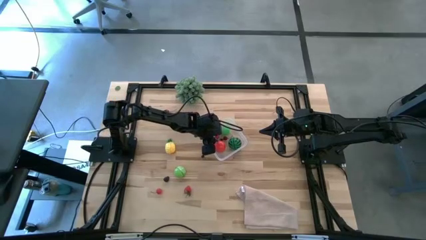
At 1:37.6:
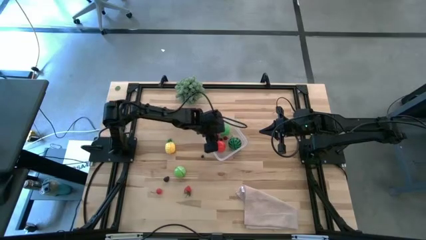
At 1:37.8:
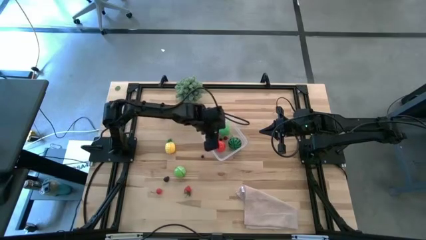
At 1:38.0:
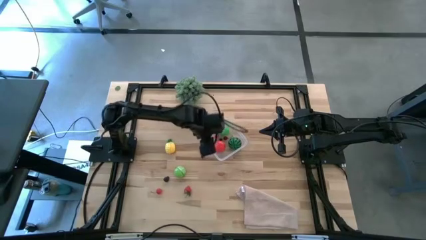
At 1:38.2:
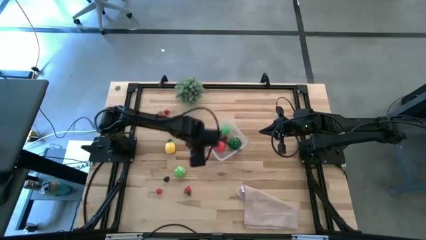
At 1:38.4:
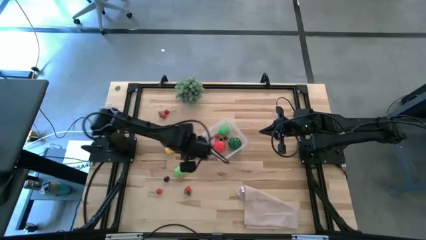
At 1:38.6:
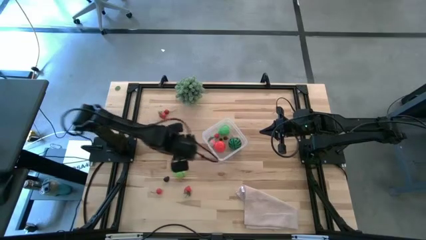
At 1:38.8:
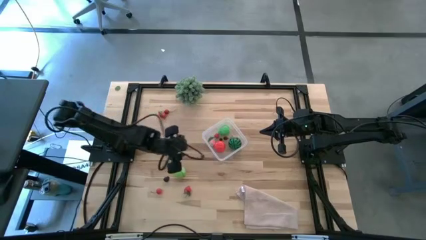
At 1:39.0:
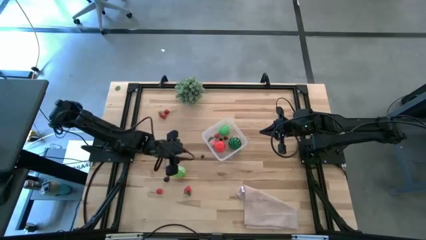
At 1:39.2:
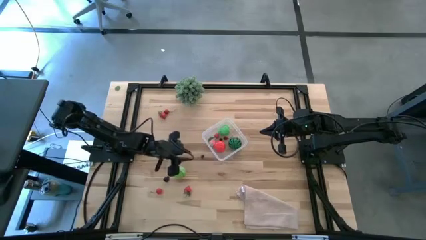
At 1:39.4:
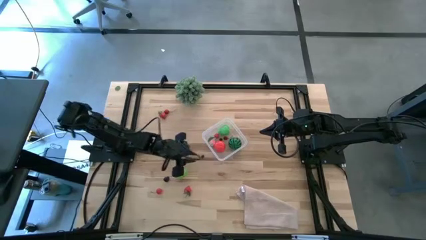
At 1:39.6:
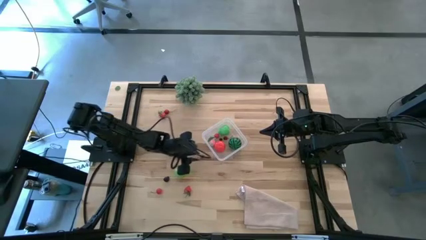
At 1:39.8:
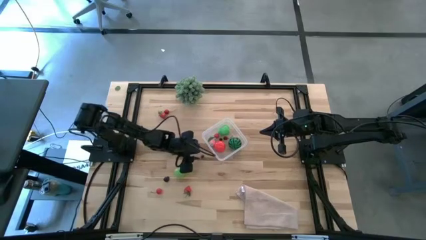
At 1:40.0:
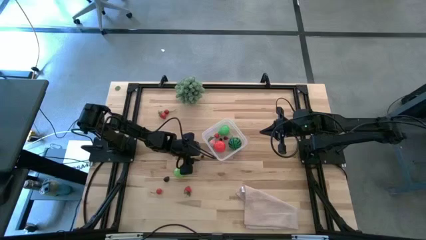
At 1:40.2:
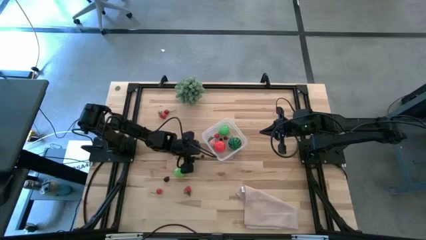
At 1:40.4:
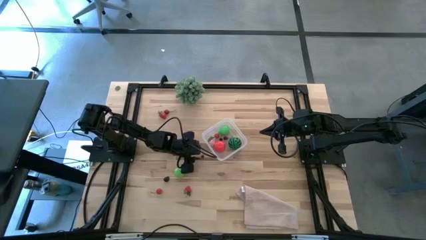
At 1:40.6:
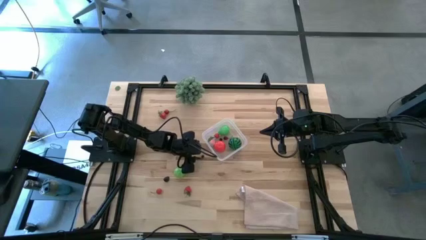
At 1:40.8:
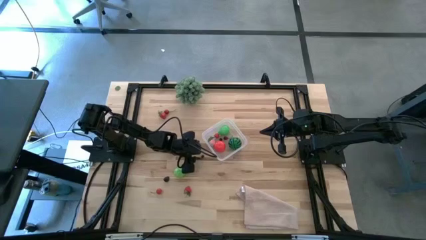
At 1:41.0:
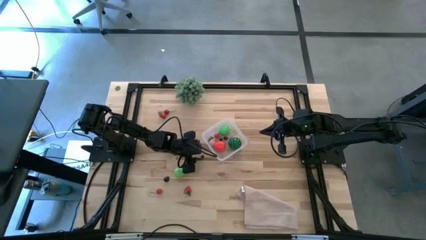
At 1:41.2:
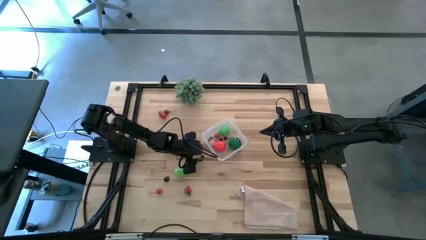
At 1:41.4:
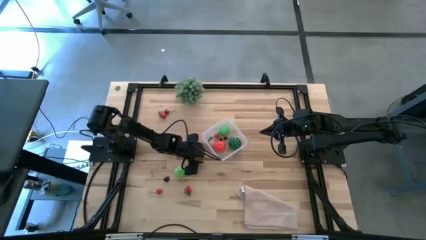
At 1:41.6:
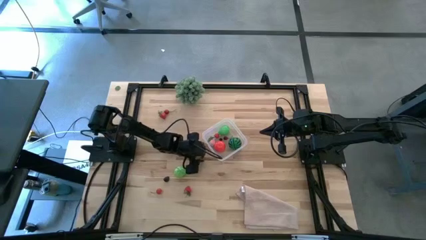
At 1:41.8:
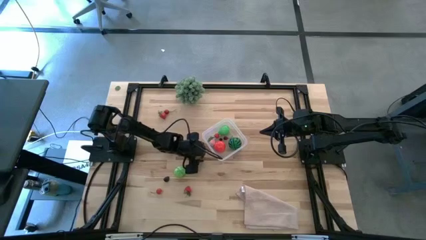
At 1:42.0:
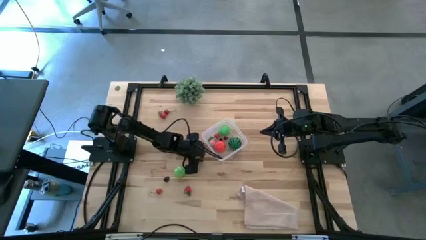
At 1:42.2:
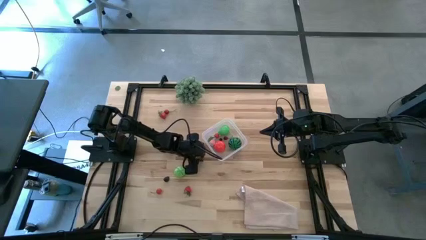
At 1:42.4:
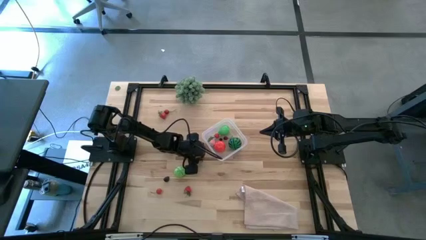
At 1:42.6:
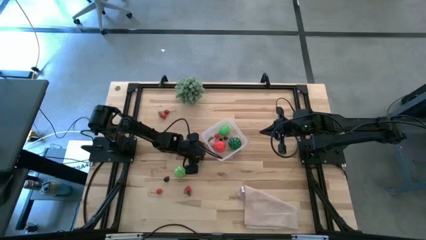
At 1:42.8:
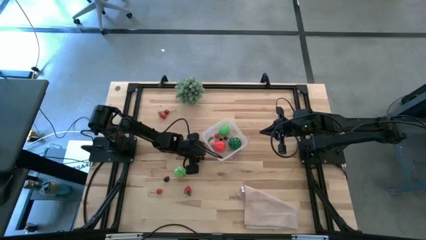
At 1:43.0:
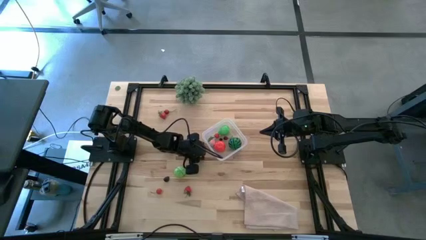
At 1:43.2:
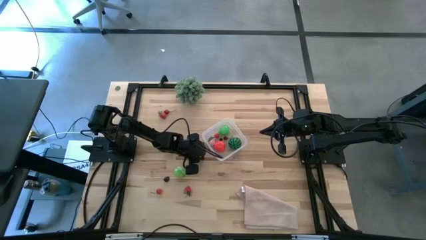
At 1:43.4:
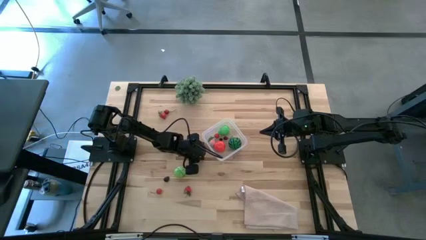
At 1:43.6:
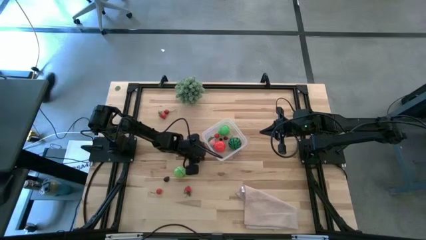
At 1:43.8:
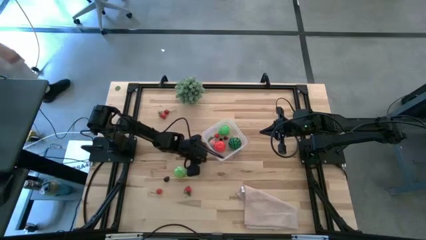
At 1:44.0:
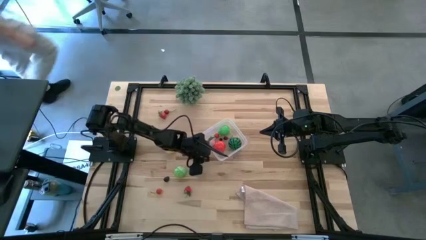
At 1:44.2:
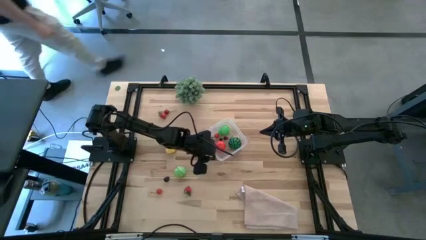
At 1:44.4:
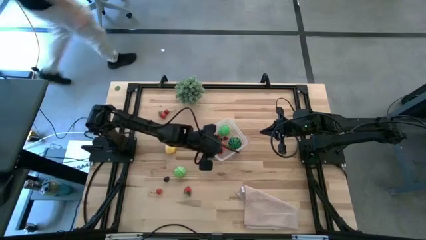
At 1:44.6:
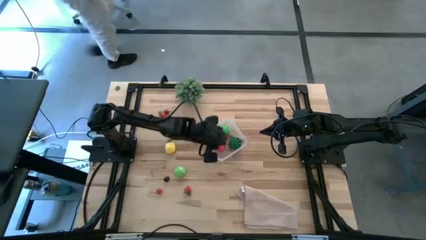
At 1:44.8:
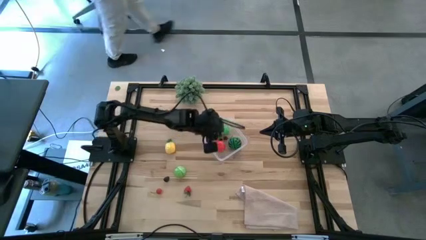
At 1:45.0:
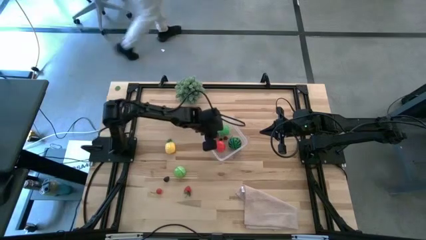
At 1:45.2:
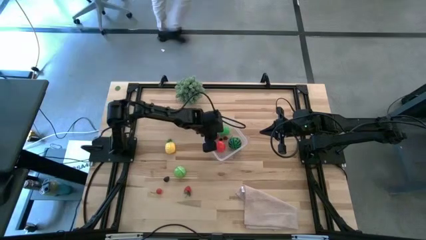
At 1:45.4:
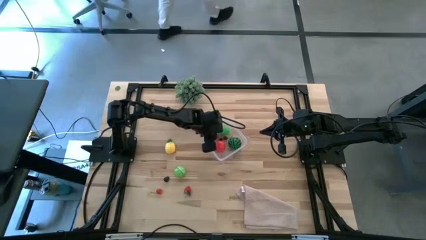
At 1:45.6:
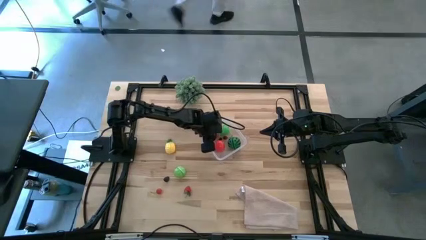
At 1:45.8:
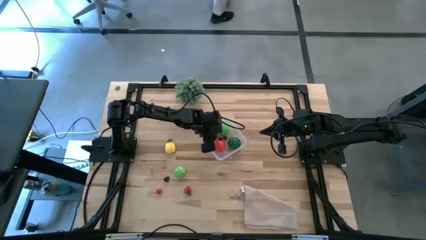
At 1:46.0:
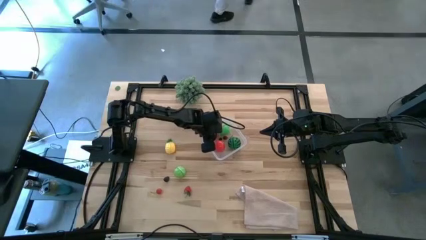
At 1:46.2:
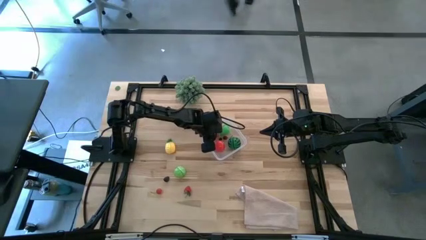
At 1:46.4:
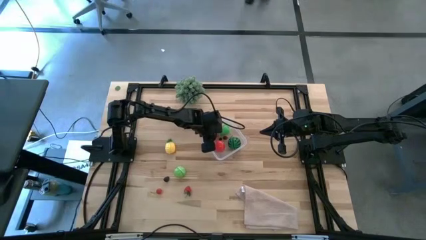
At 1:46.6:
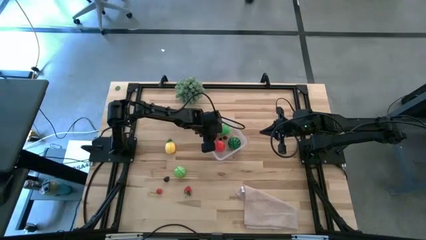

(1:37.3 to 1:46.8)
Task: Pick and placing Produce into tupperware
Put the blueberry into the transparent bin

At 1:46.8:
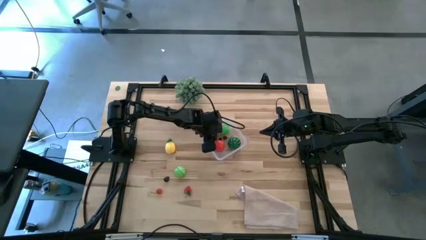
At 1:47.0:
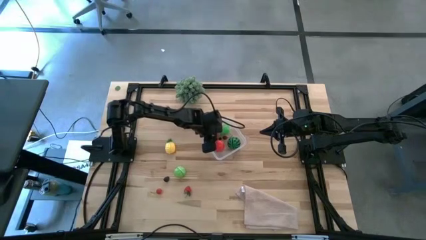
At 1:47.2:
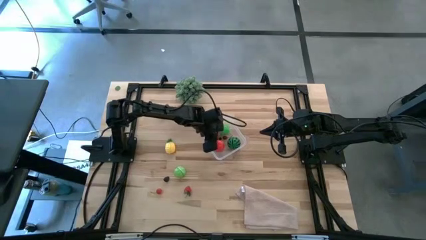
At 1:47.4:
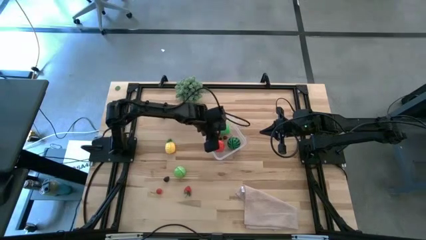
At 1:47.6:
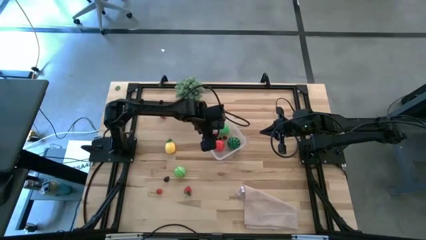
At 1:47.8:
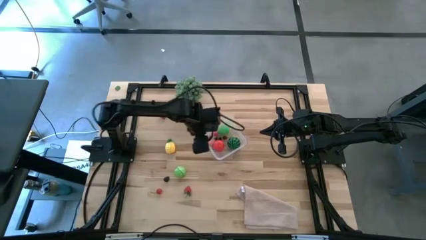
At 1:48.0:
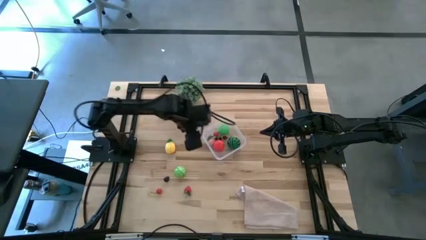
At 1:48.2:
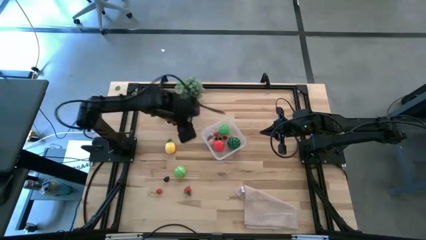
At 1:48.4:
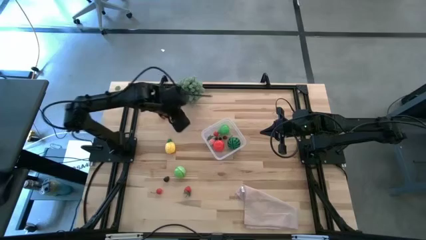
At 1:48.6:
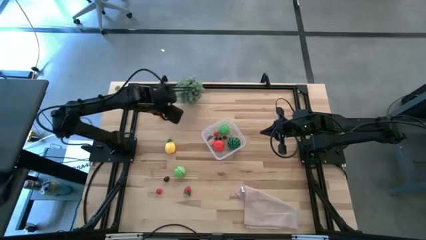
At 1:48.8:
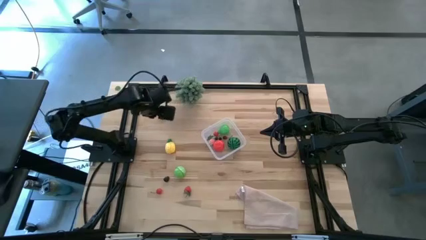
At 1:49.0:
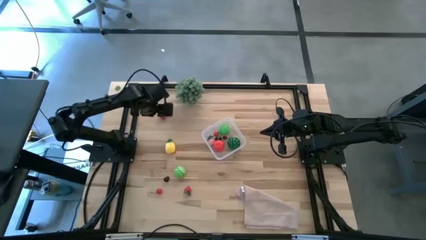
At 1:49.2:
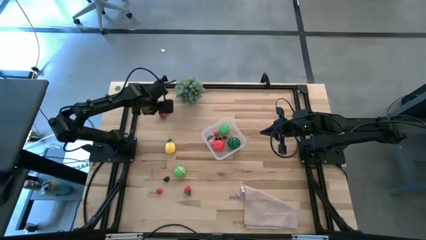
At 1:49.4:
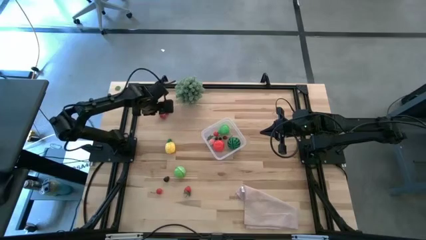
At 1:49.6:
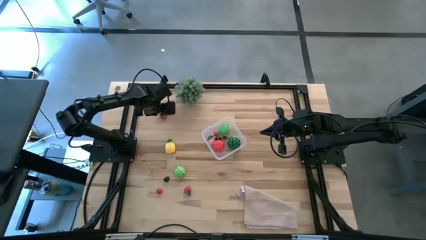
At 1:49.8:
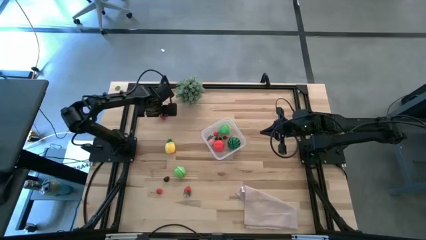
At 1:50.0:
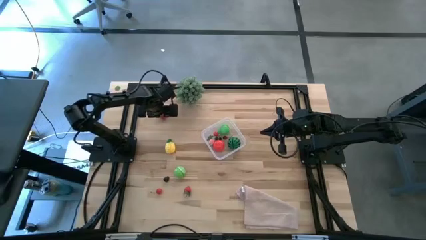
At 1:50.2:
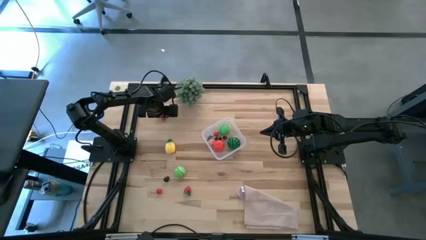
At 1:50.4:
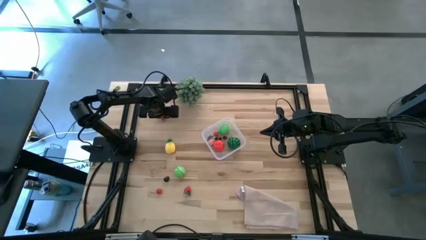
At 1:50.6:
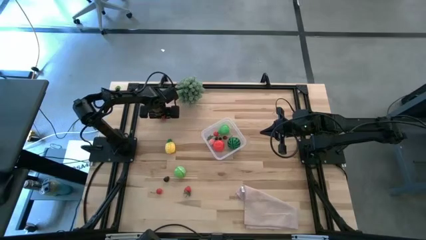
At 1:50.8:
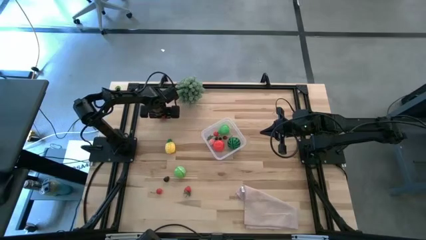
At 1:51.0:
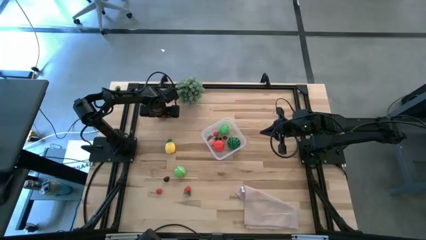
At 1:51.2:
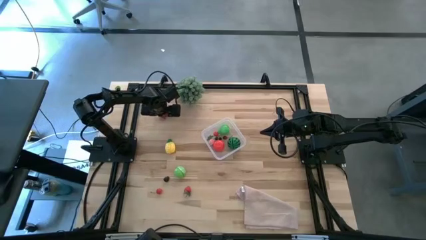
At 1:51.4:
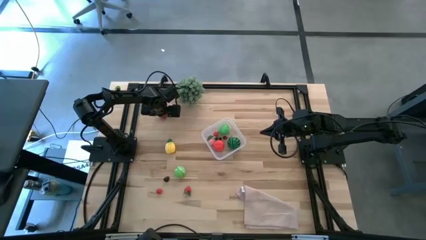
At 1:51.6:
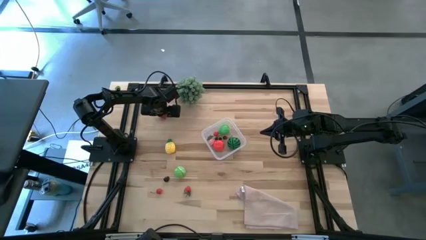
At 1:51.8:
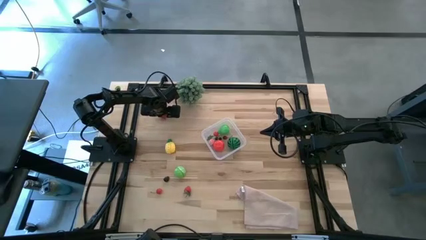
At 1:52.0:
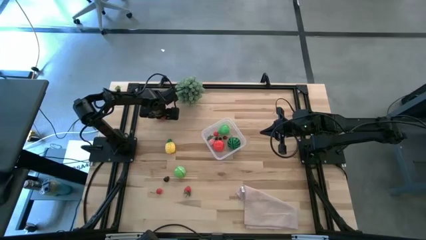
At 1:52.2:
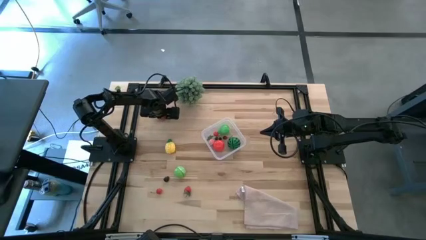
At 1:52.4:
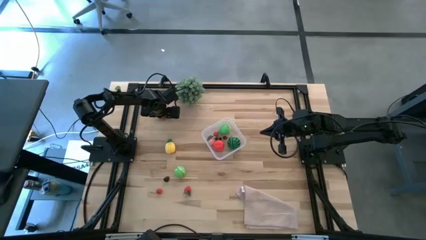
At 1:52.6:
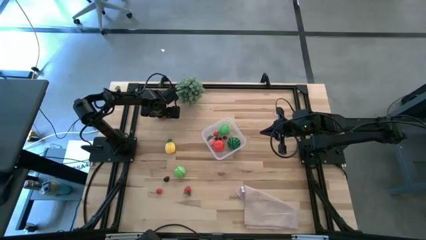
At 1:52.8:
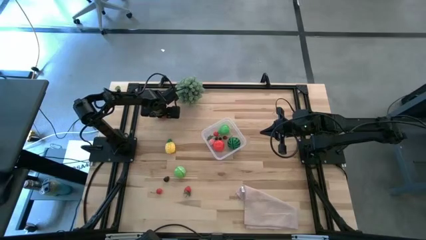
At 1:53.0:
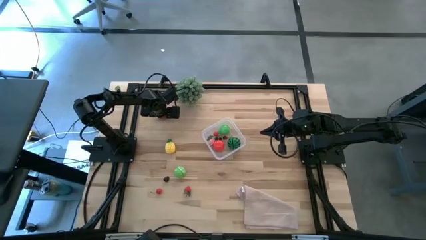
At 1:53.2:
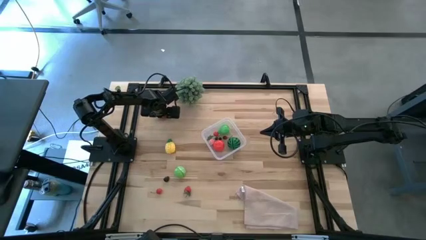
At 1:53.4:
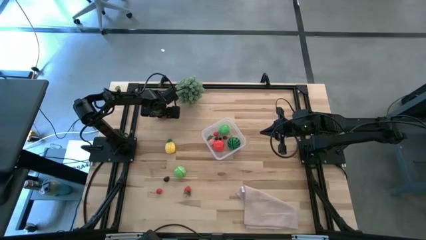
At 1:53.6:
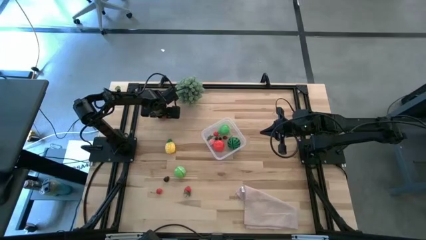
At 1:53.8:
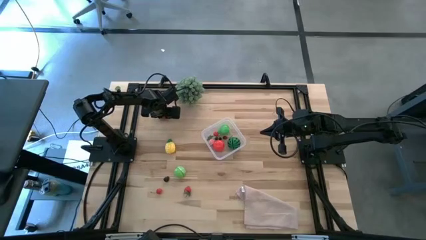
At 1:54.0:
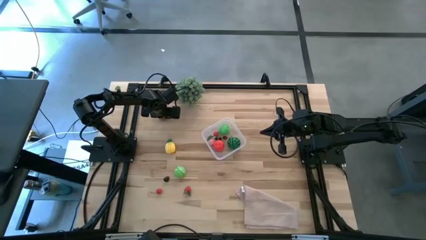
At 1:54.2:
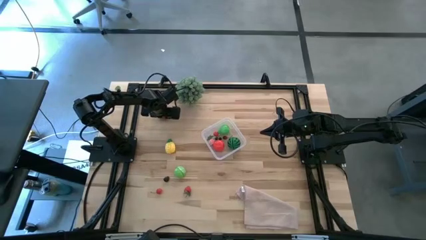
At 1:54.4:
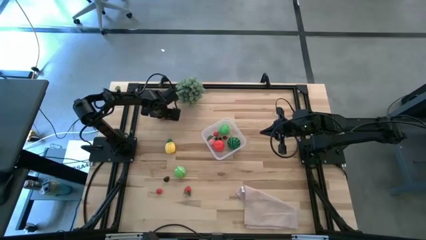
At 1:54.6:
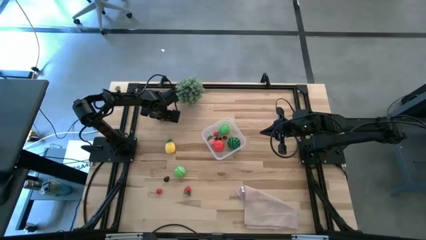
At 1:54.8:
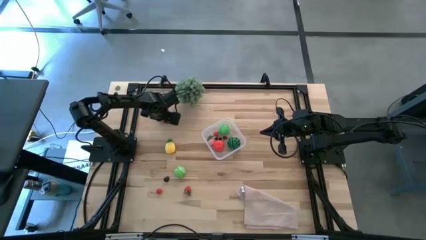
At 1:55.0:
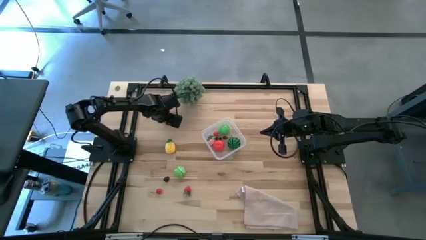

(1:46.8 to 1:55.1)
Put the red strawberry into the transparent bin
